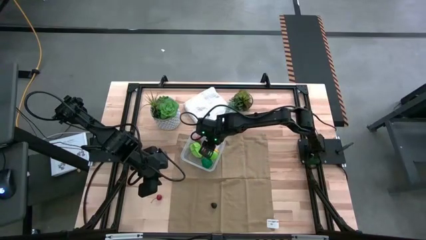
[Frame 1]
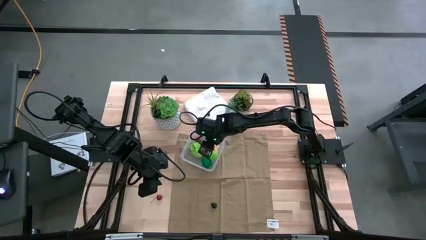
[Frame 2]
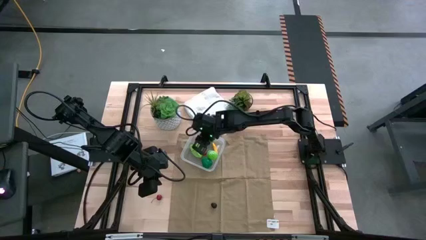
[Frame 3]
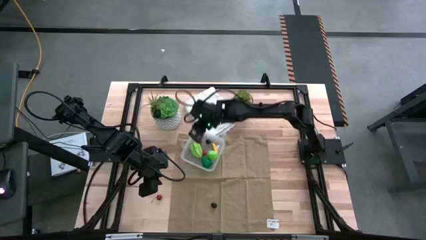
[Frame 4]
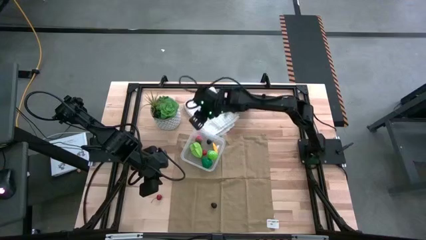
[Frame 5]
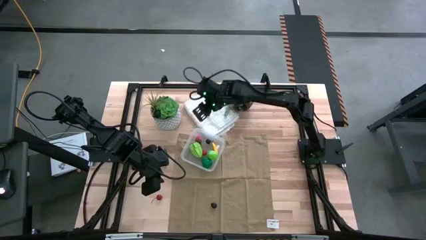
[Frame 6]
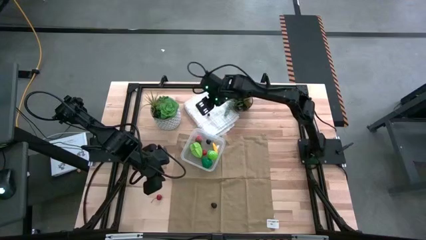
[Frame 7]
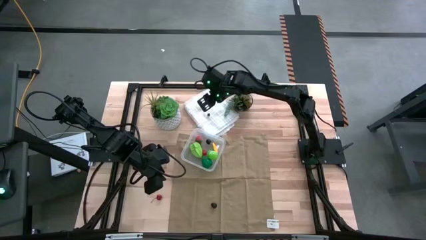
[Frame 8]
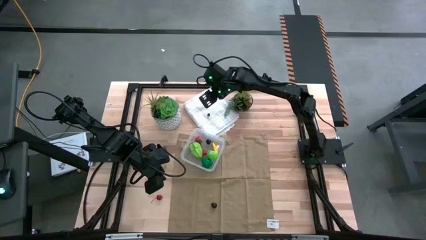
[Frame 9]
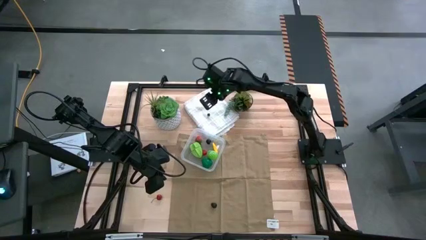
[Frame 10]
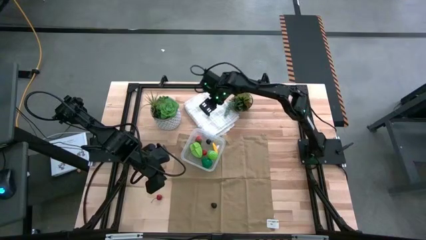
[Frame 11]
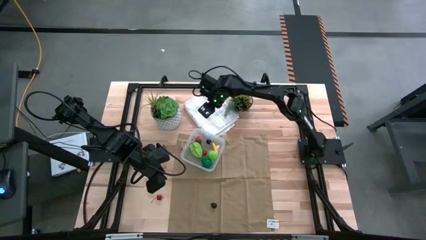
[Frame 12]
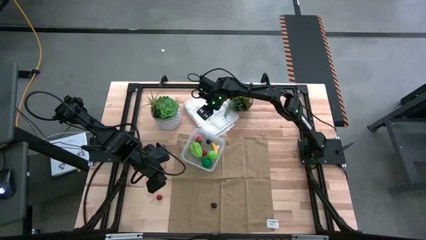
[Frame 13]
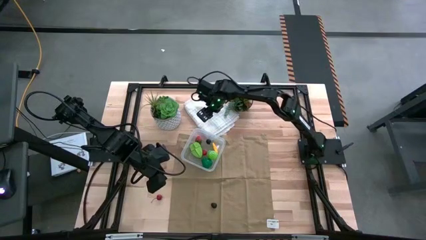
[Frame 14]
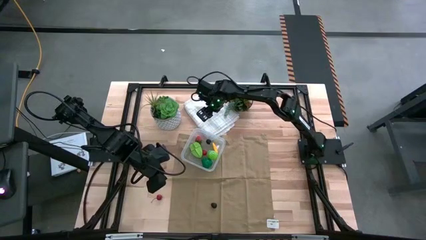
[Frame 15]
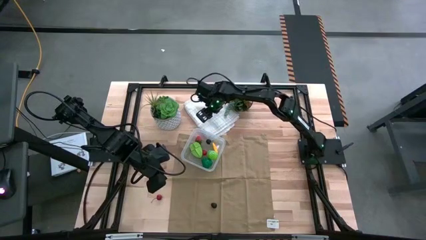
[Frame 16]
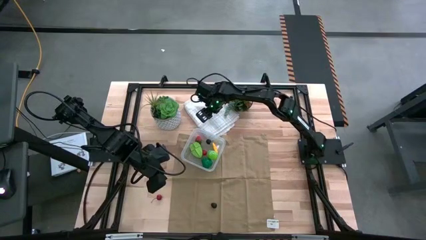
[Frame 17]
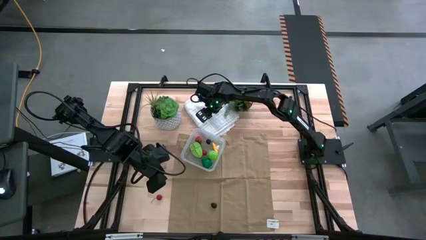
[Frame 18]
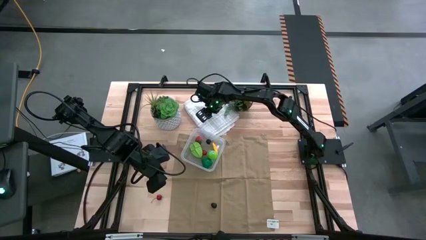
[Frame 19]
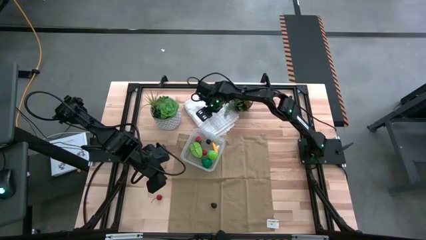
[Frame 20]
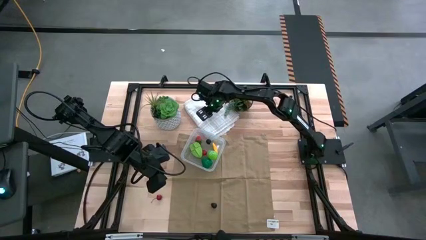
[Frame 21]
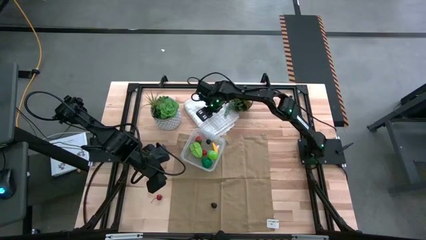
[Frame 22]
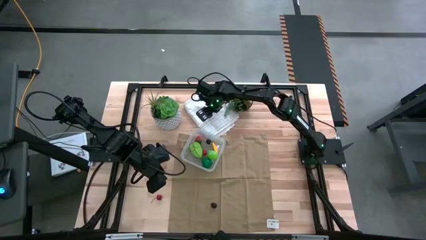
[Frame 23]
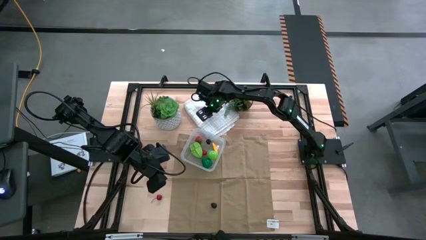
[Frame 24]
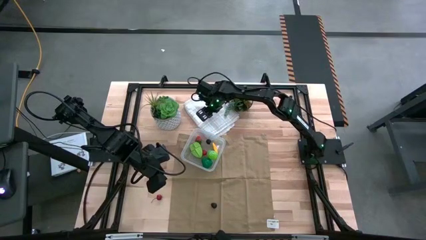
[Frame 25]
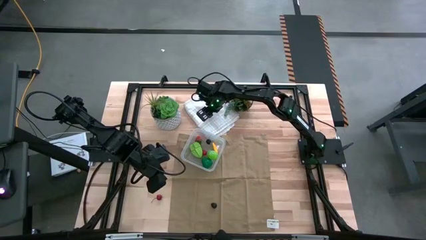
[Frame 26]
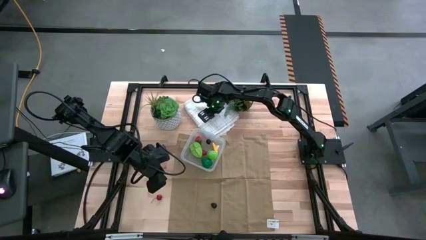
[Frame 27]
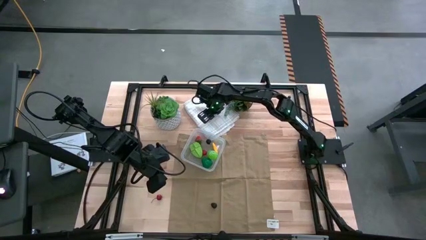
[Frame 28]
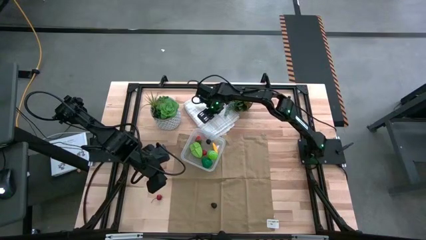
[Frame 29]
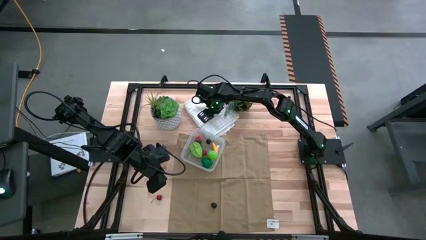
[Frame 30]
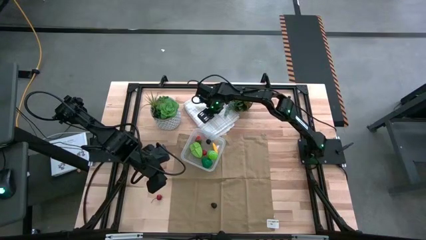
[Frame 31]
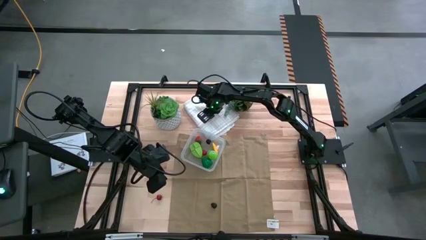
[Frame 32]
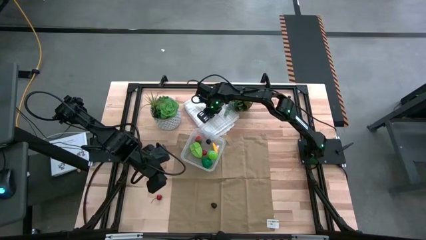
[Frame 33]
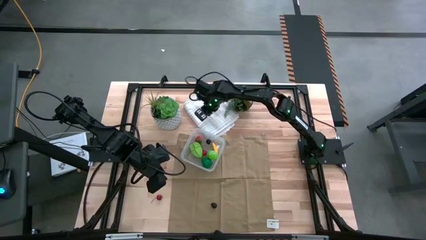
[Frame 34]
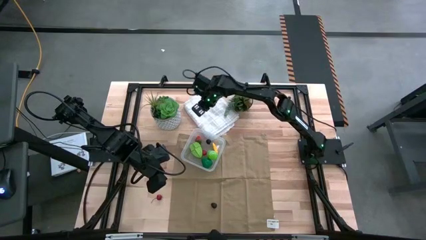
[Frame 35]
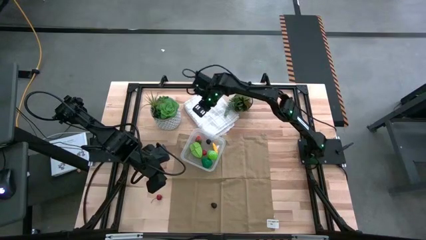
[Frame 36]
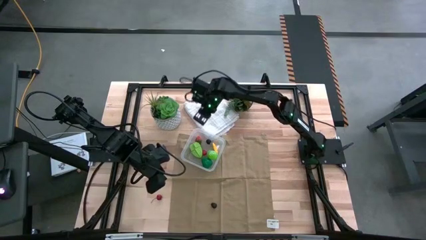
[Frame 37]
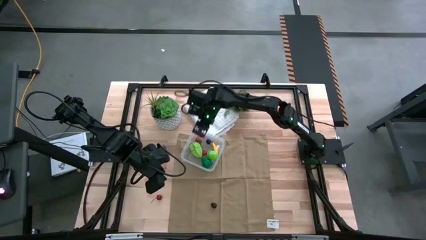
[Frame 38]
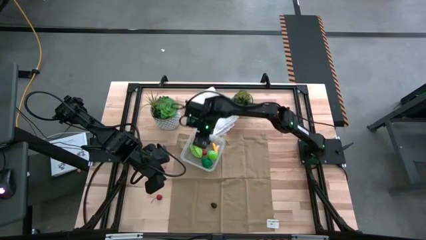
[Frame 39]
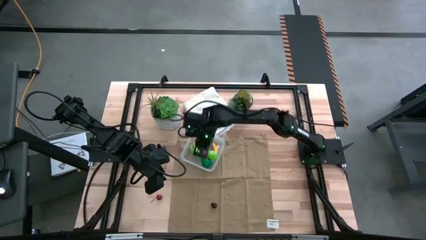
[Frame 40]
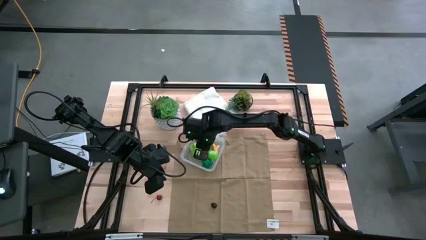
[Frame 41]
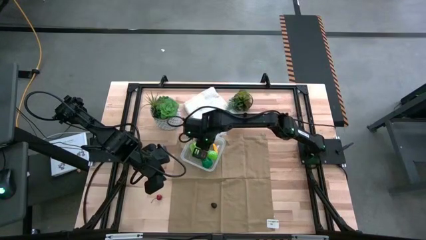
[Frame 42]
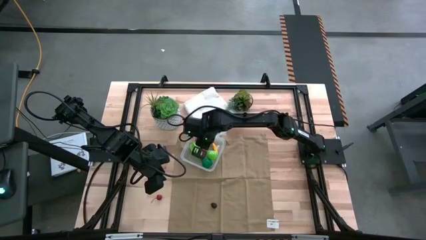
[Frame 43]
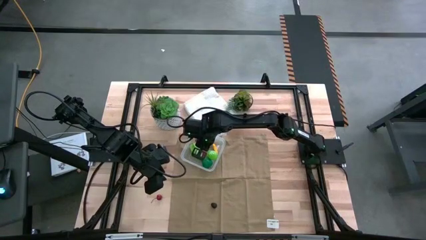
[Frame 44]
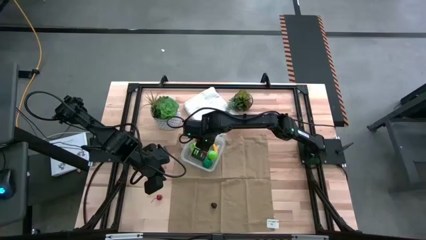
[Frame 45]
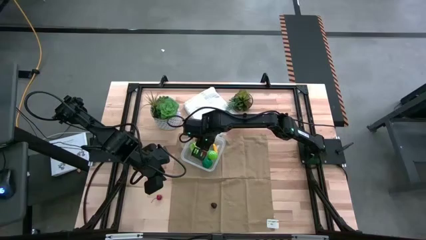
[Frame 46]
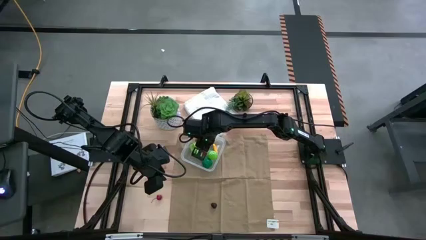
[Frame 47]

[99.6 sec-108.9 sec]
Task: Pick and placing Produce into tupperware
Put the black plum into transparent bin

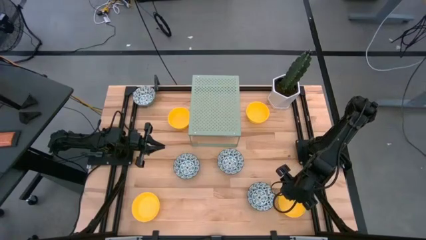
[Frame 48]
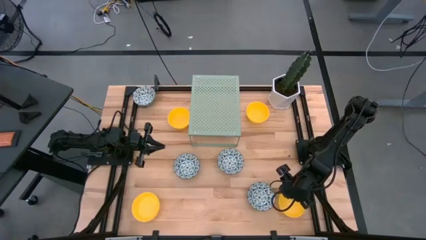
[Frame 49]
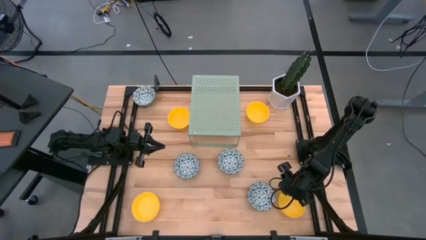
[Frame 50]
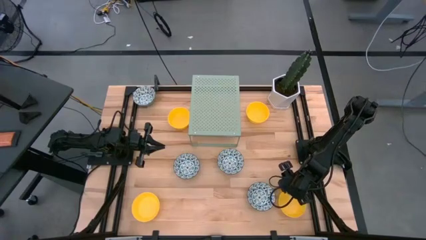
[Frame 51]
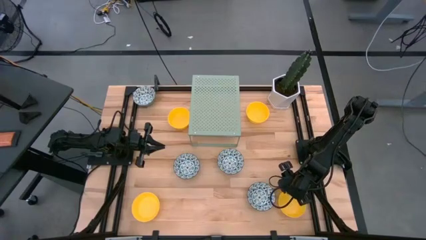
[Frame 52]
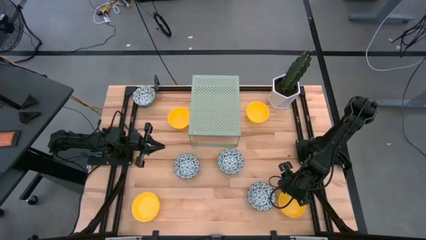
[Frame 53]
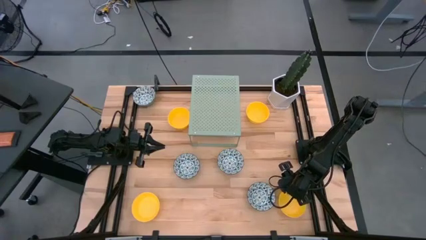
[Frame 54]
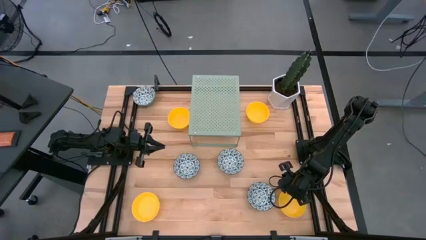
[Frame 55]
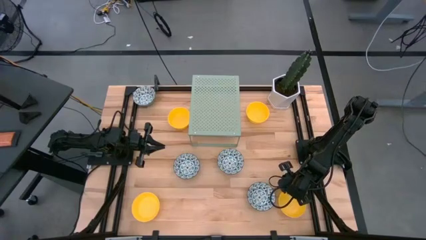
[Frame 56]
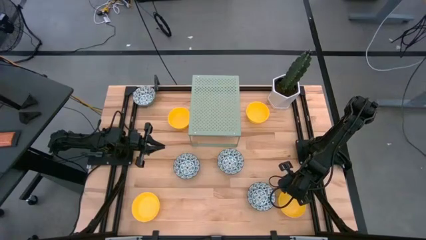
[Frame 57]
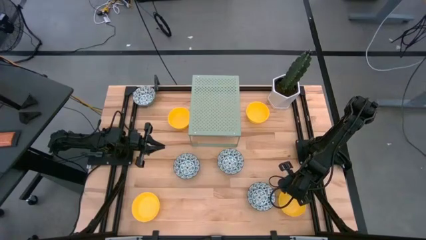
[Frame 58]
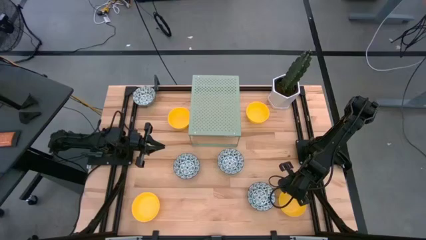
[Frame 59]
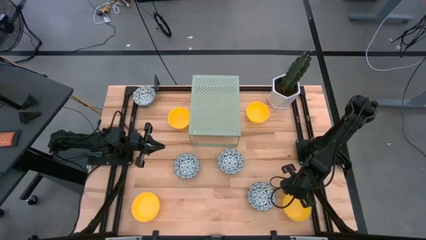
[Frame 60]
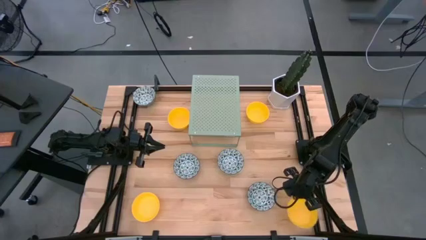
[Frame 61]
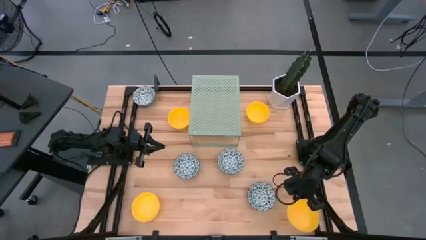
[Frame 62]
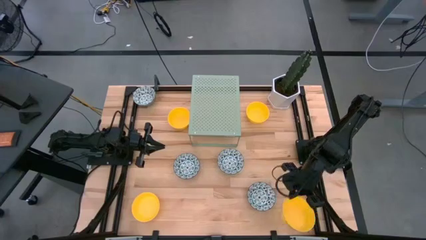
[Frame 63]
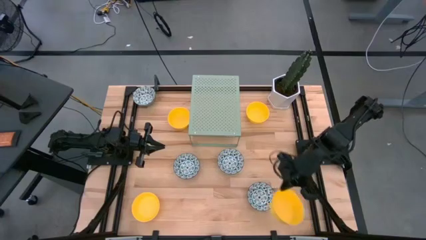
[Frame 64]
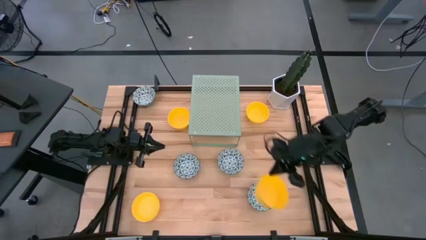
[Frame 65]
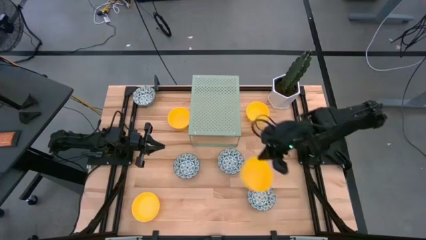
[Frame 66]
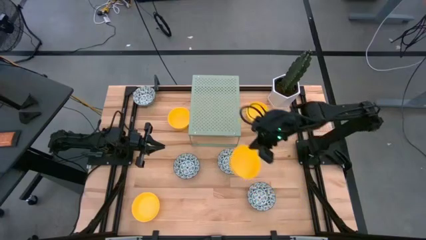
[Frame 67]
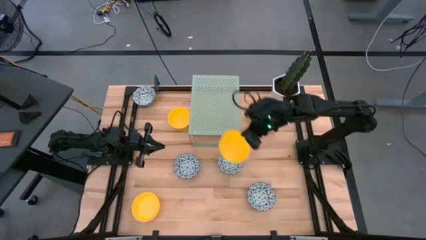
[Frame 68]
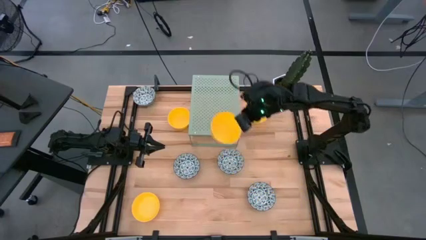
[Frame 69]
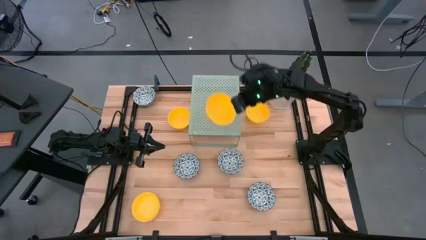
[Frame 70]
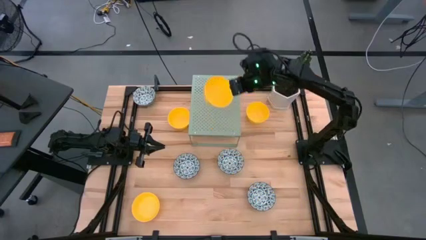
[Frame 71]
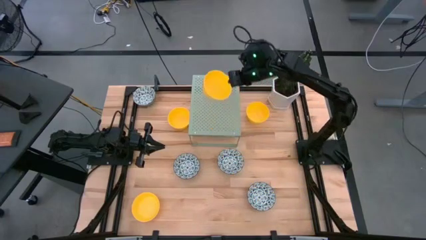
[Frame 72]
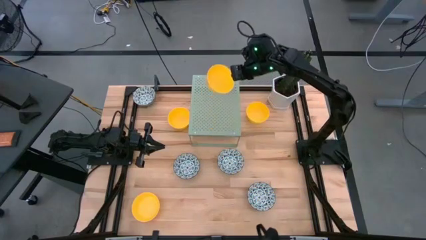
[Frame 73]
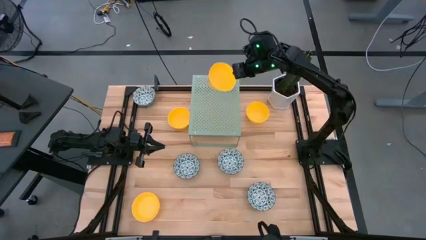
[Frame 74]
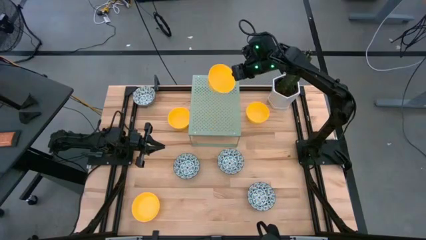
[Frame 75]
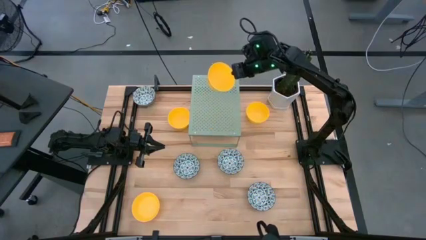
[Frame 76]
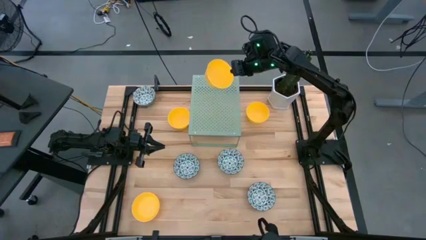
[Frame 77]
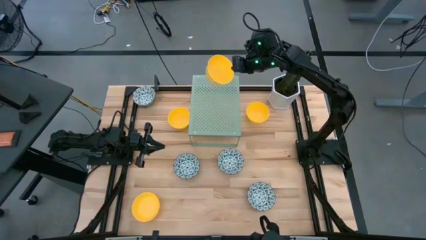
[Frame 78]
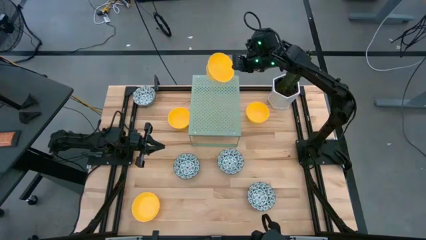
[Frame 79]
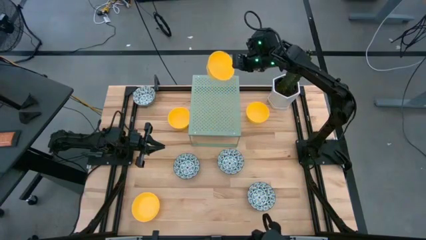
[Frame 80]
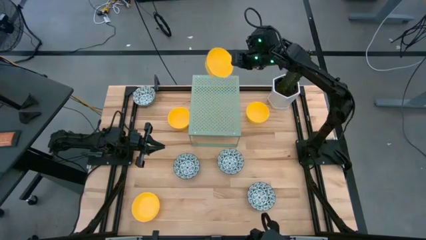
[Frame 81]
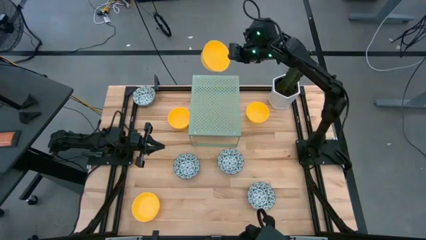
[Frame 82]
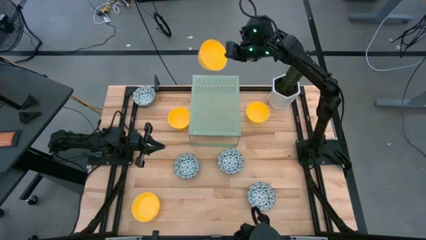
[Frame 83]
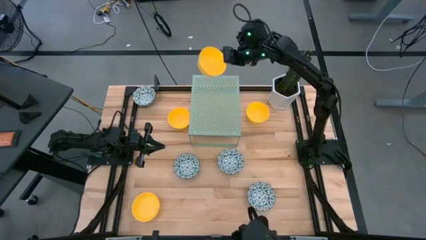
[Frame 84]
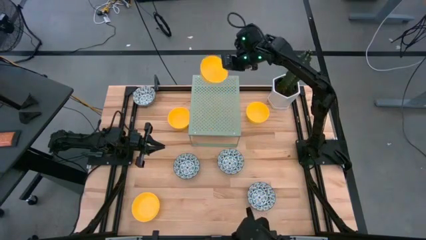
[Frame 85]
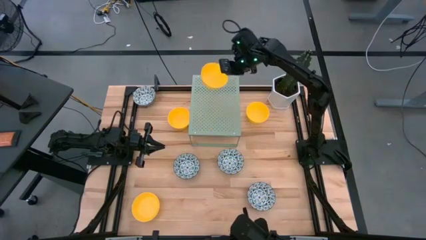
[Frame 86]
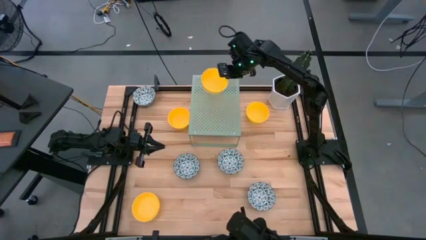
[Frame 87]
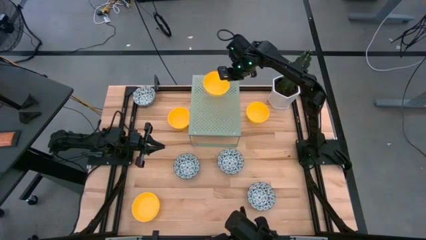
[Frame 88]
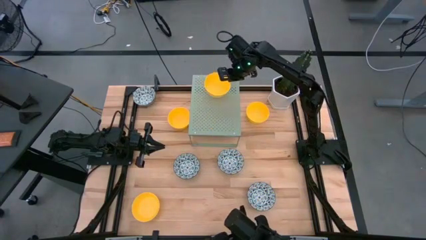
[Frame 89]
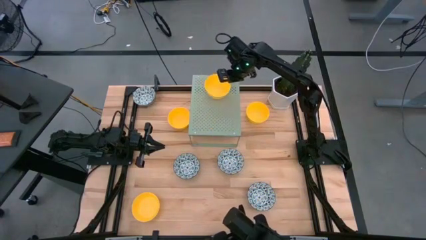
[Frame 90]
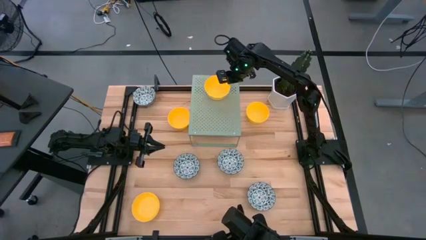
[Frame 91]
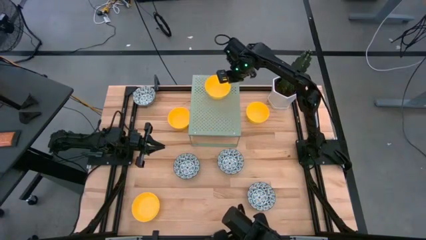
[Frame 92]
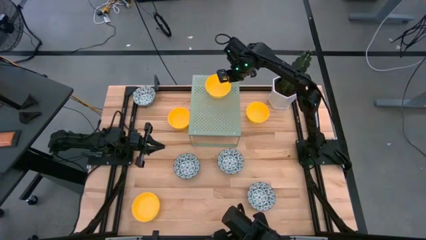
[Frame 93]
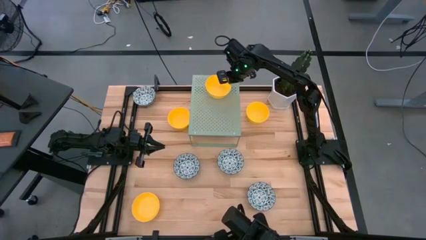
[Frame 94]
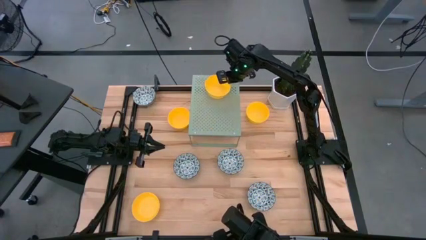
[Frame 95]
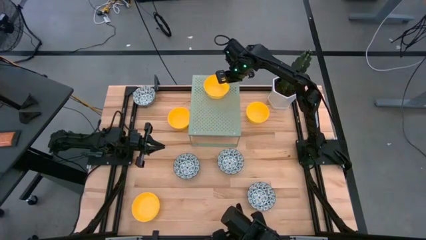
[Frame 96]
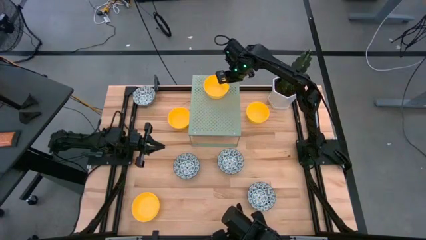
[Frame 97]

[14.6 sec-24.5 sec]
Task: Pick & Place Mini bowls
Put the yellow bowl on the shelf
